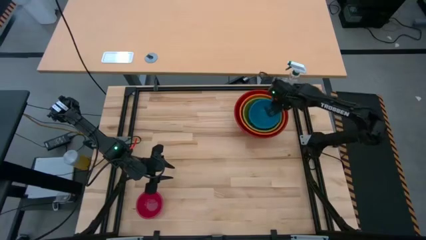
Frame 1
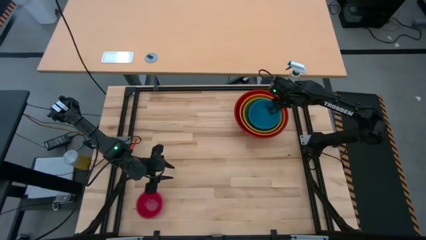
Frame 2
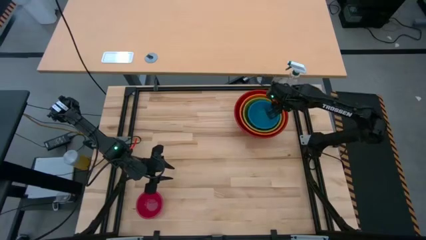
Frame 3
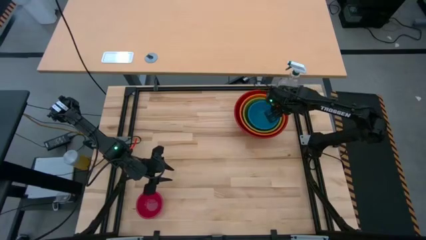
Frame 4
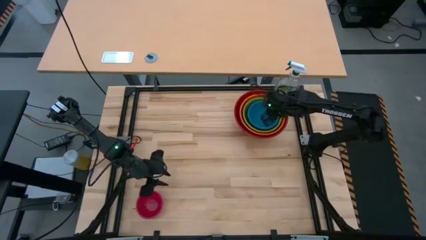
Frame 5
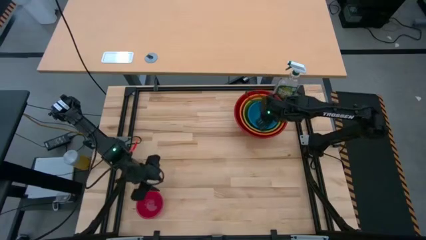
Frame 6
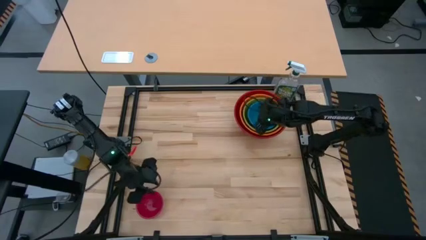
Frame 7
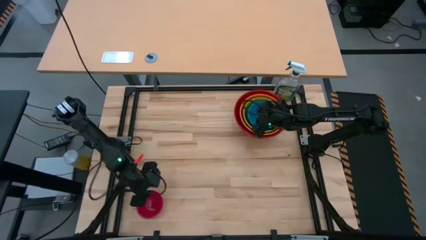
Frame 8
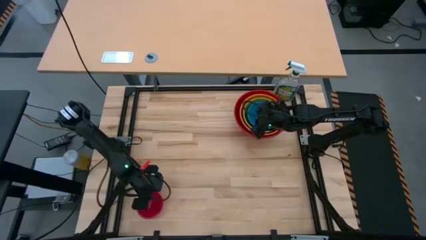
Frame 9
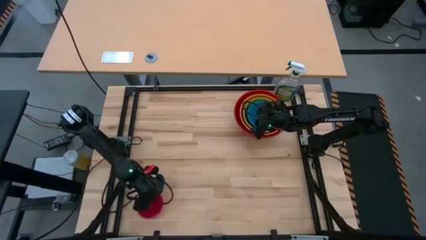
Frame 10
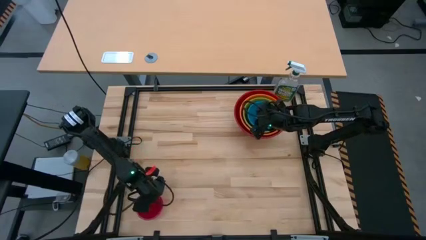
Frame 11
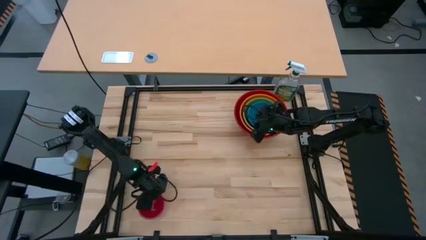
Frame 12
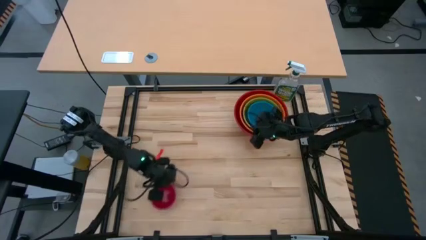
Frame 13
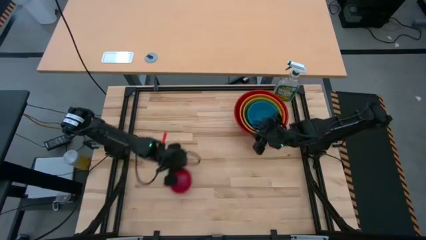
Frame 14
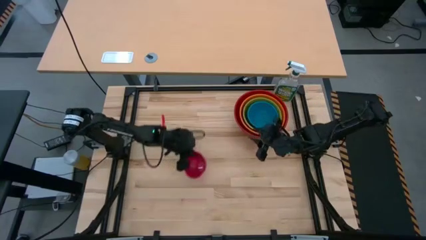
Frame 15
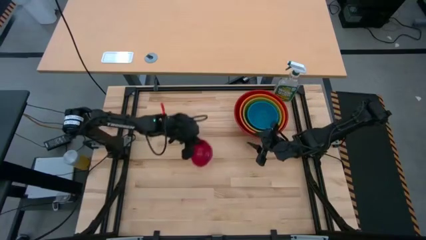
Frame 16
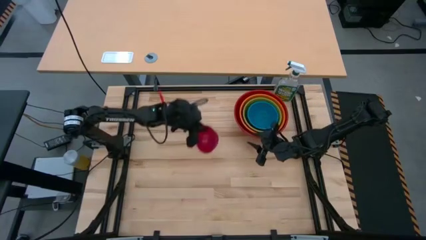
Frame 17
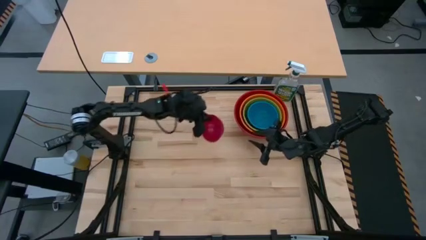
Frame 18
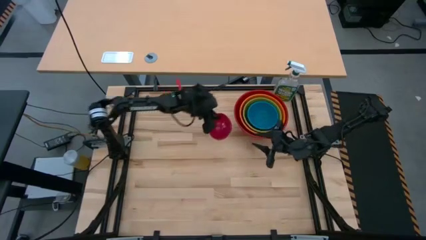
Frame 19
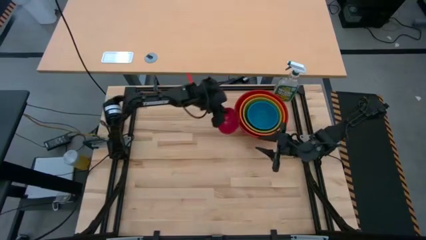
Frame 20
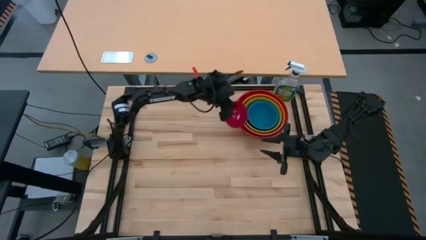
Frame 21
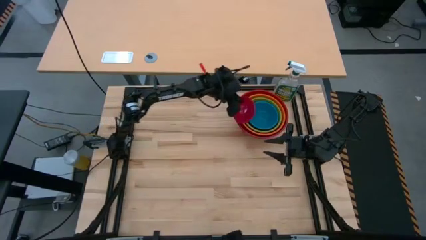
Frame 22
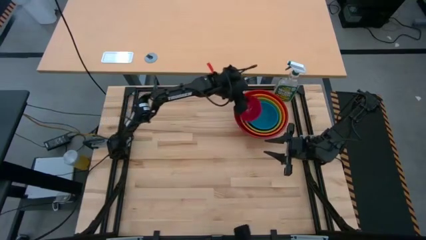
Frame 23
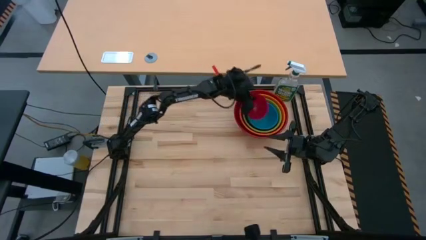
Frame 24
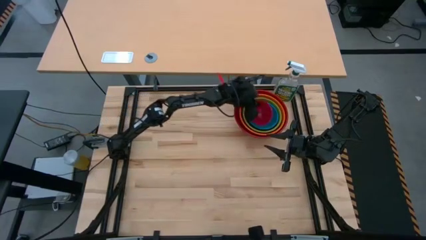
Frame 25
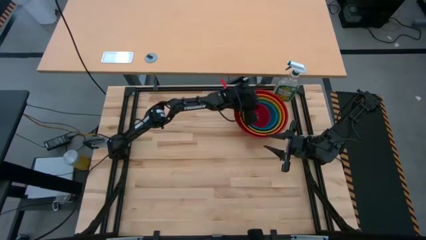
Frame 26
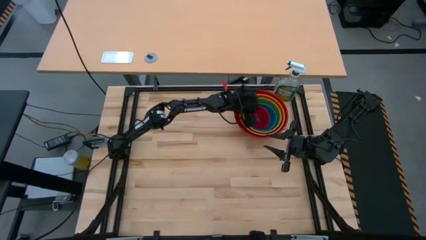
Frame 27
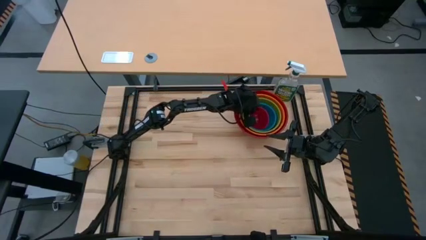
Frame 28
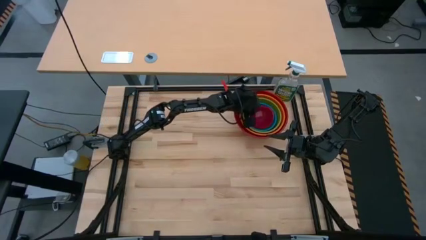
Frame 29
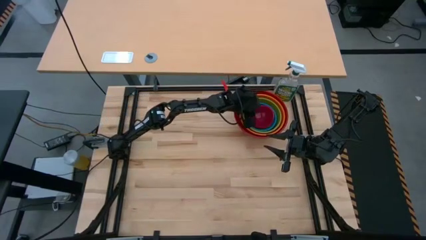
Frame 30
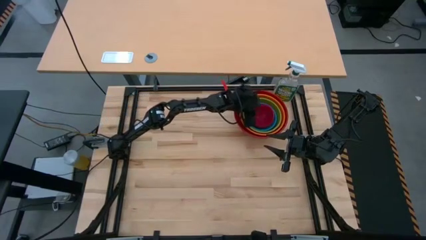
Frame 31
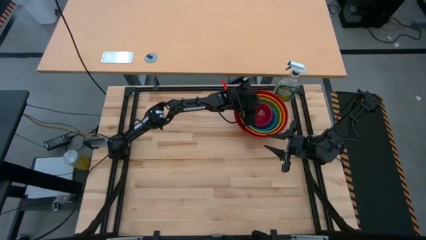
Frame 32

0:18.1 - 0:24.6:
Stack the pink bowl on top of the blue bowl

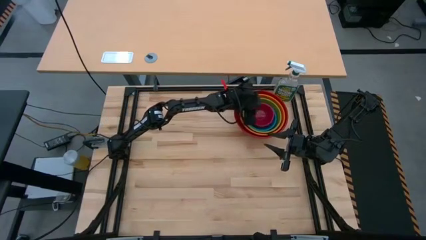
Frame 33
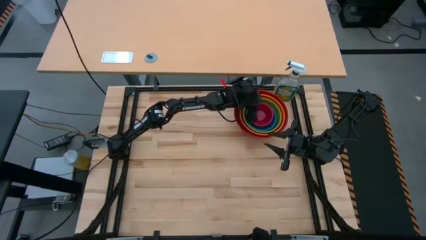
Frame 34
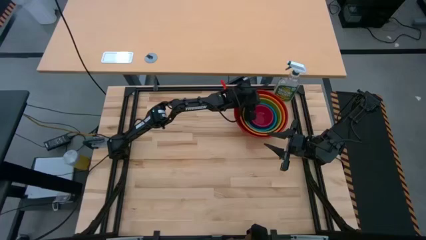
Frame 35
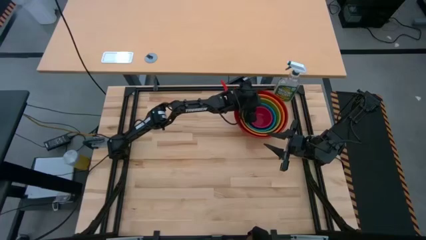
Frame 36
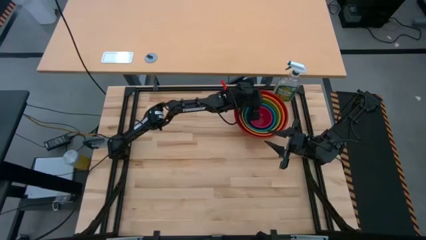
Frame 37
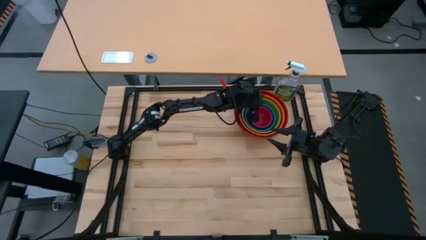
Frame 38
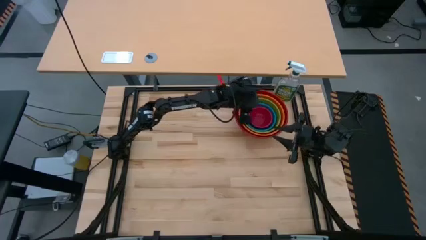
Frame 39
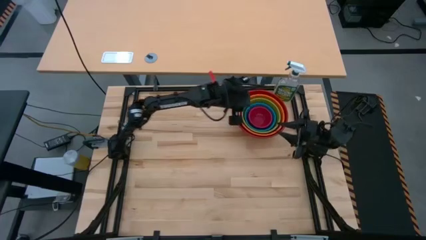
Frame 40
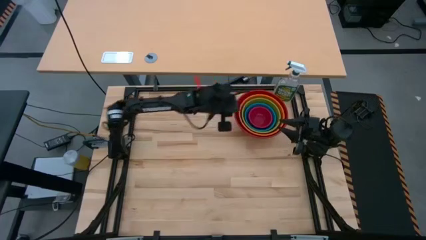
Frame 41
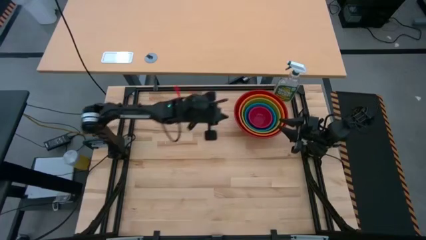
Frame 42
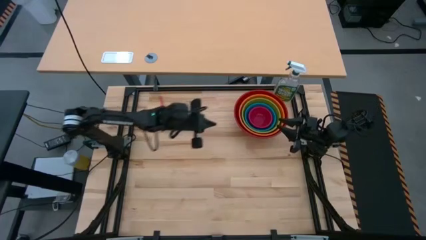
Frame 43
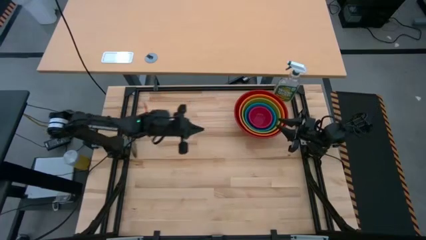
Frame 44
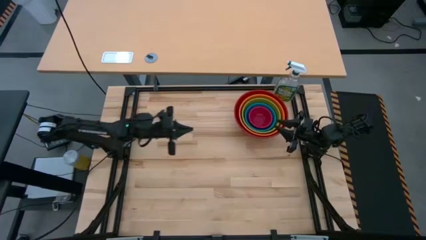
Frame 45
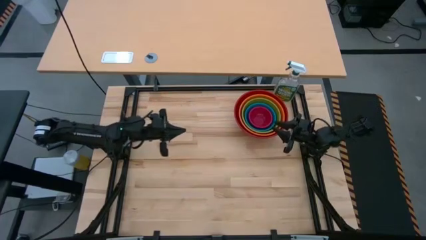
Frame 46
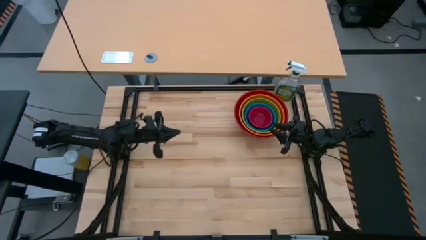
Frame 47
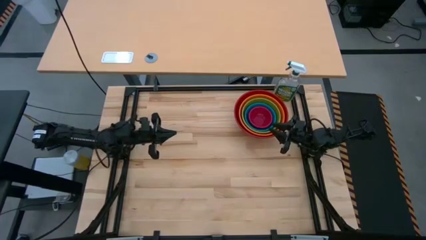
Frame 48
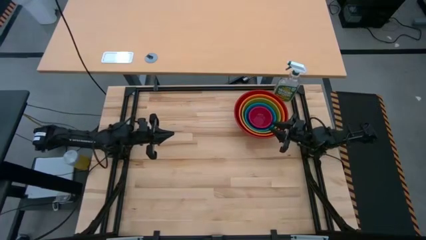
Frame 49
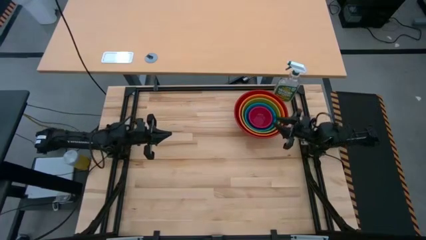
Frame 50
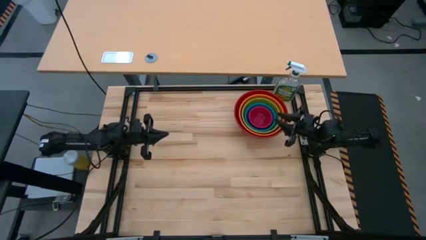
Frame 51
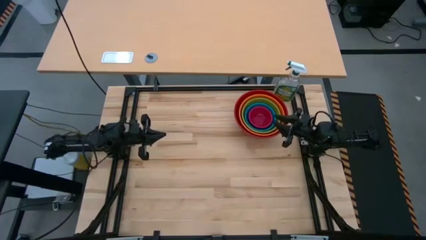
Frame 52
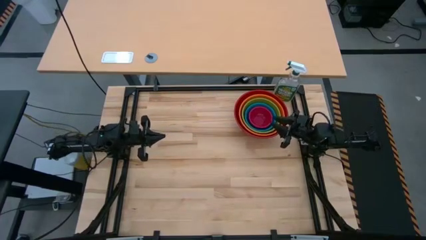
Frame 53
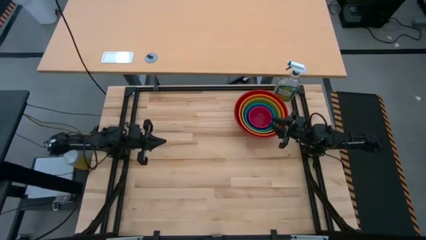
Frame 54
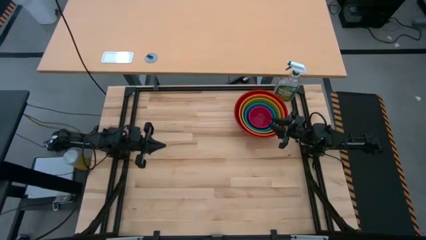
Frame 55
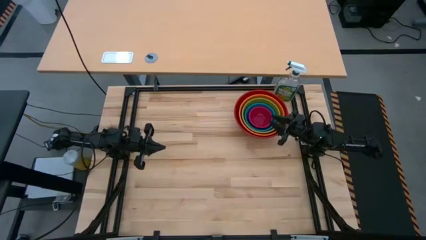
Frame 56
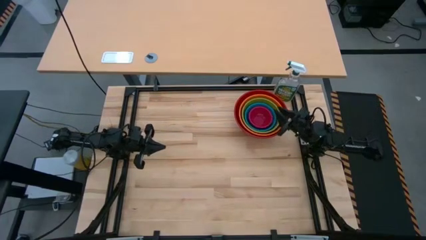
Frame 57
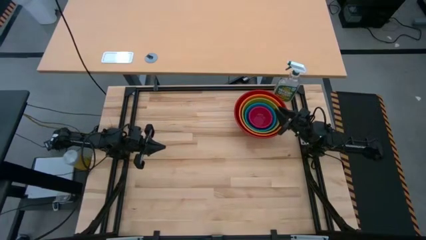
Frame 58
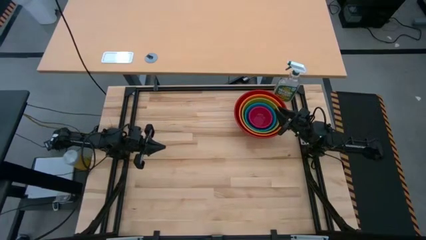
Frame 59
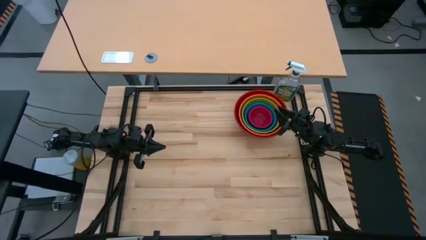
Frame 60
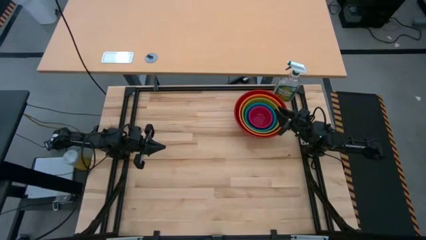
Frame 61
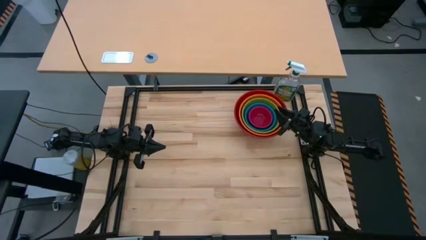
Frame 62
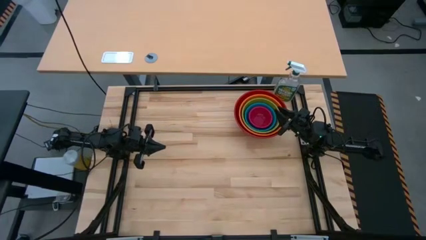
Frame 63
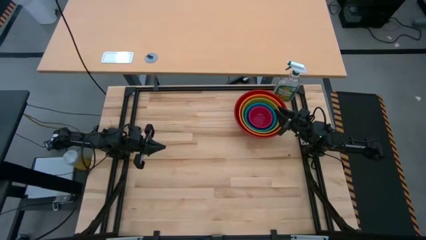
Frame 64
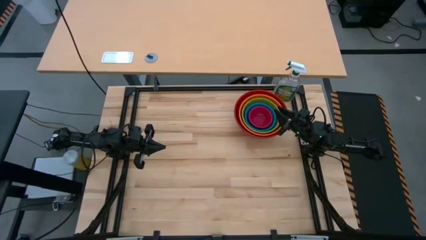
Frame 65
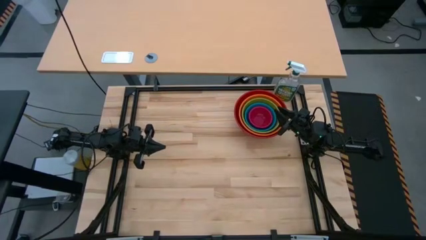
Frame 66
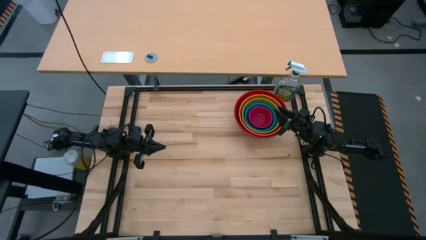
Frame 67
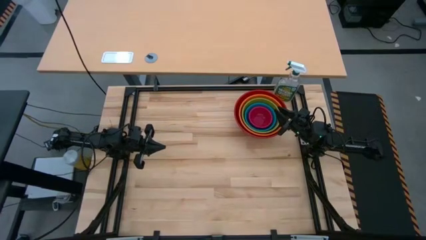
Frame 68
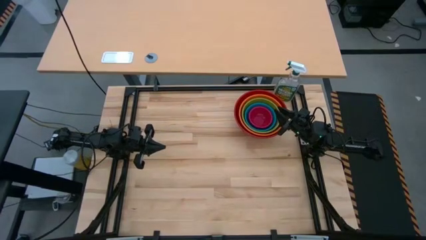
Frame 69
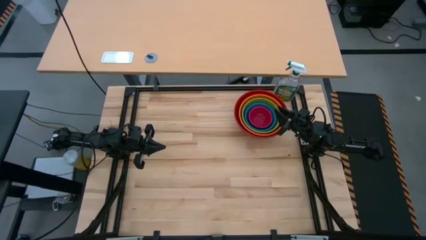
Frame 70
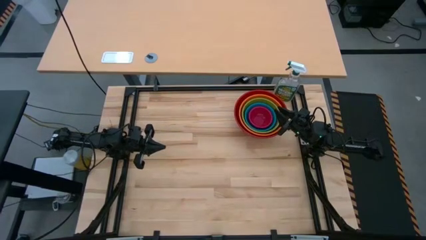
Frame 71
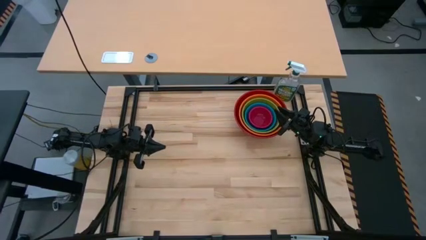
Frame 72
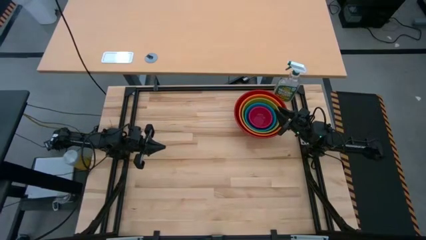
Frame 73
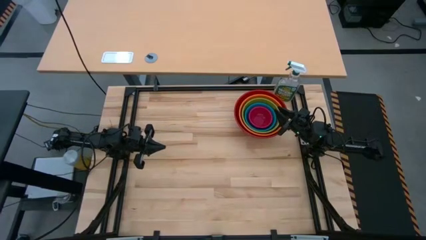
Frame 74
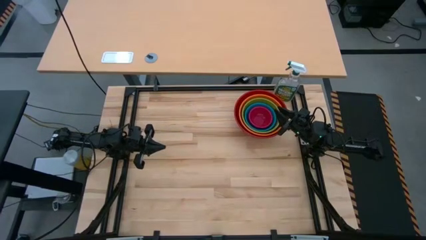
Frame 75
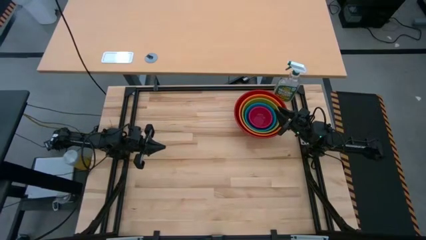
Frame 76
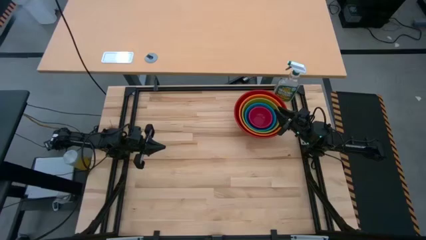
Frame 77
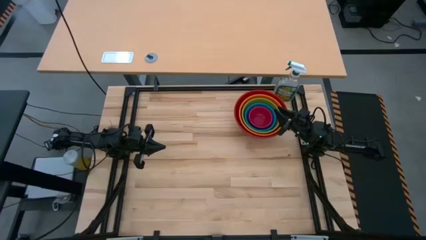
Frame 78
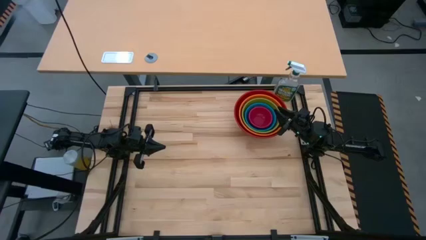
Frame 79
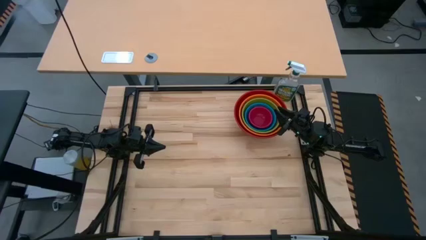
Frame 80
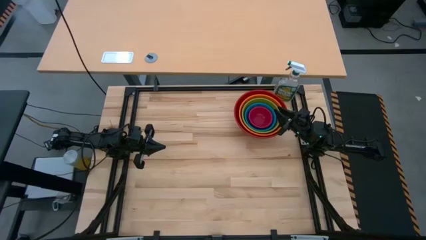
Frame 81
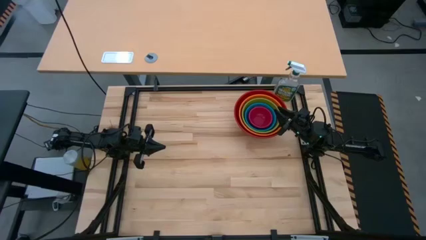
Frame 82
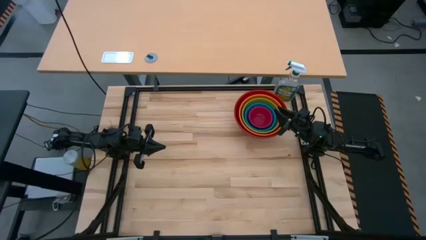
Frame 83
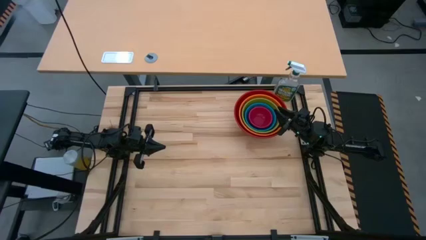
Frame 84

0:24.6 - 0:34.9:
Return to Home Position
